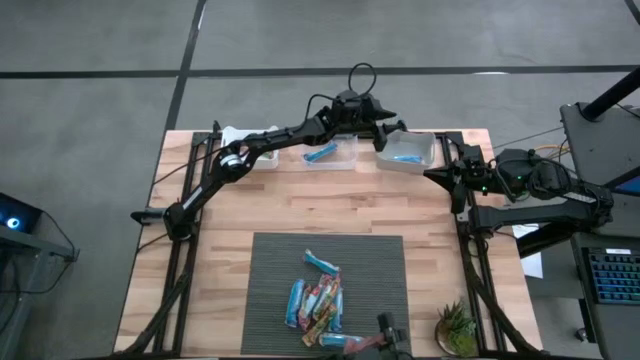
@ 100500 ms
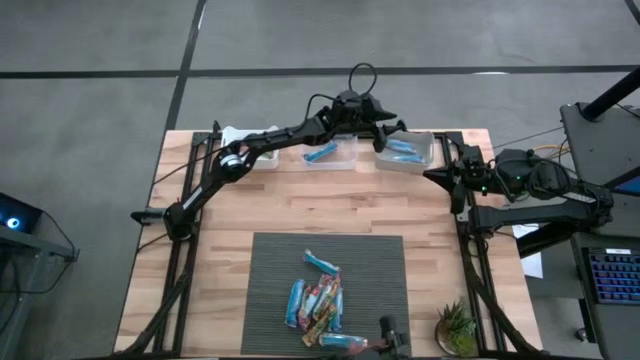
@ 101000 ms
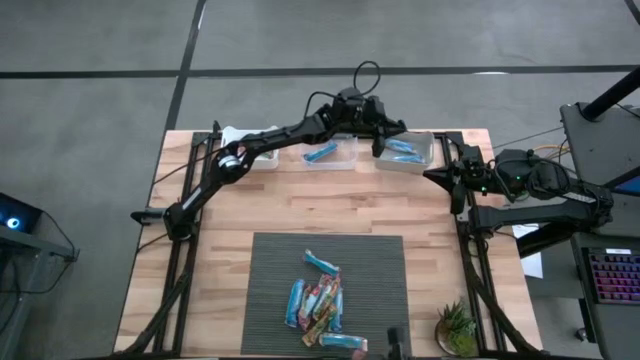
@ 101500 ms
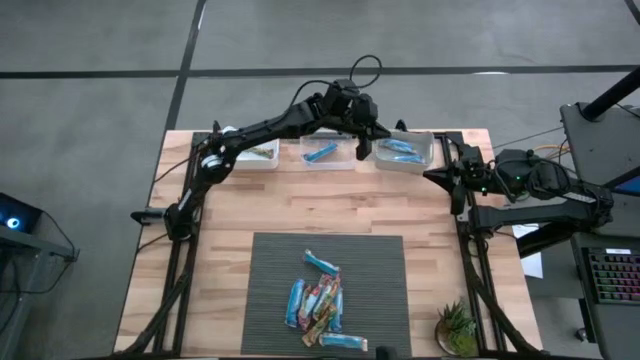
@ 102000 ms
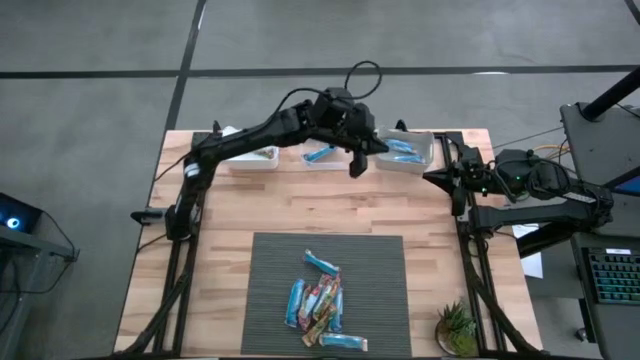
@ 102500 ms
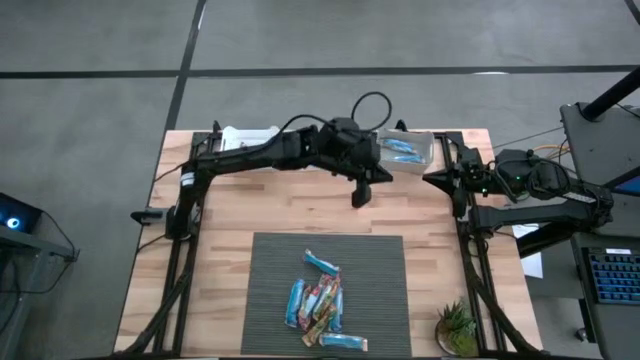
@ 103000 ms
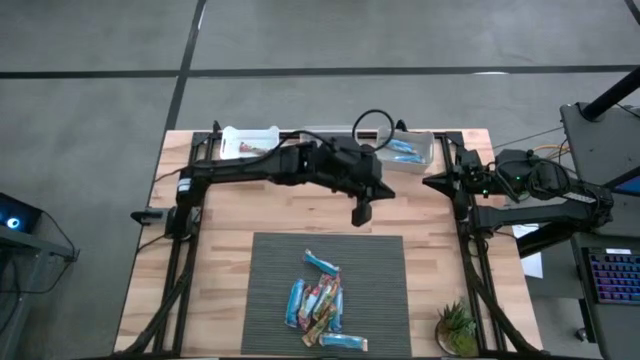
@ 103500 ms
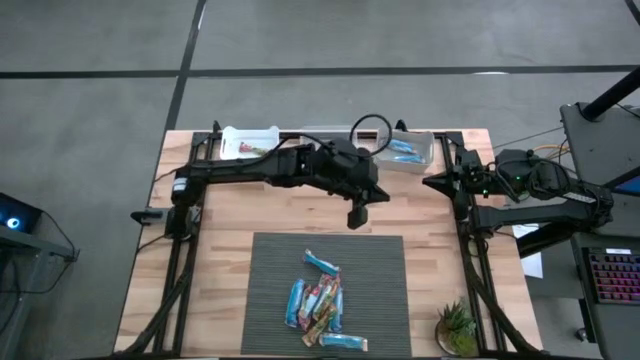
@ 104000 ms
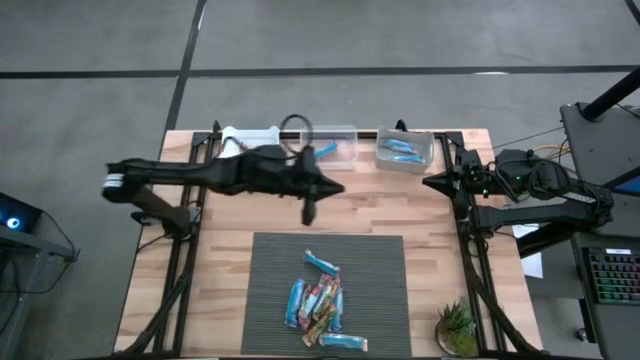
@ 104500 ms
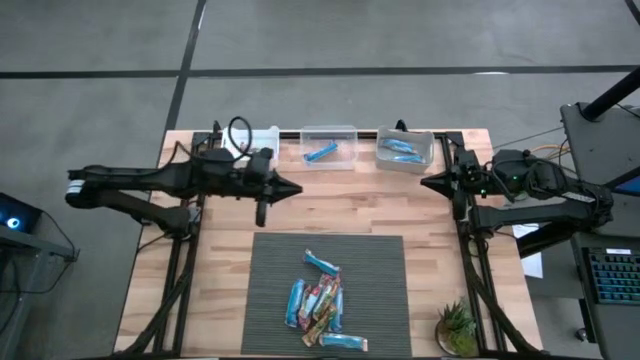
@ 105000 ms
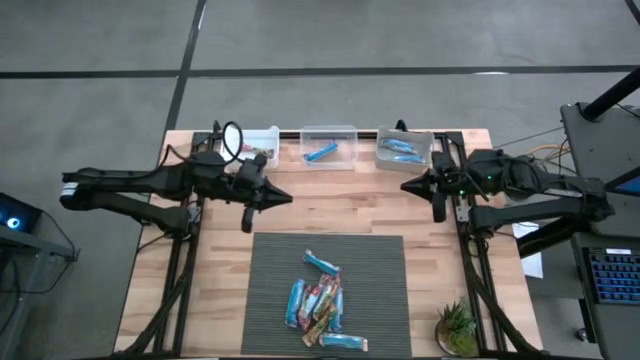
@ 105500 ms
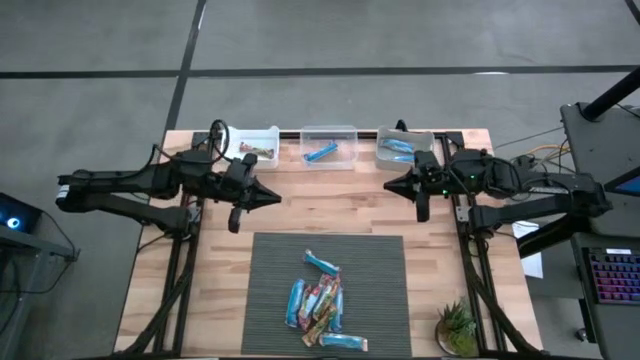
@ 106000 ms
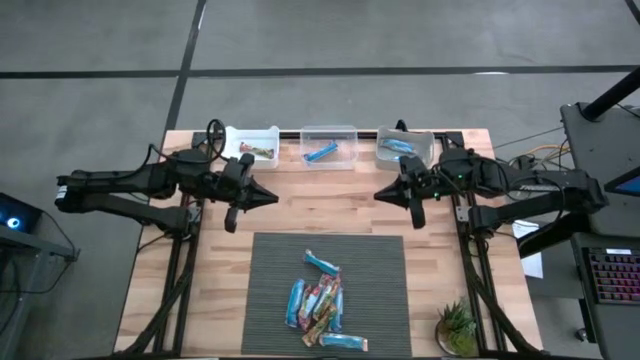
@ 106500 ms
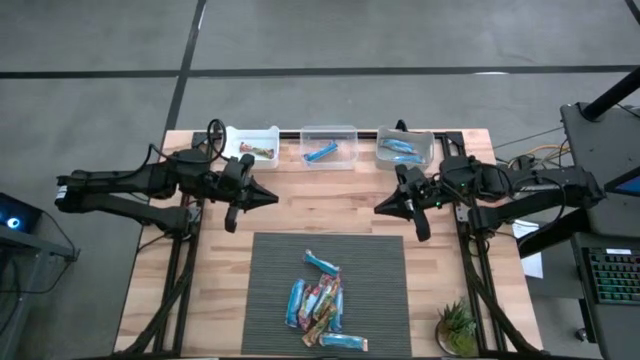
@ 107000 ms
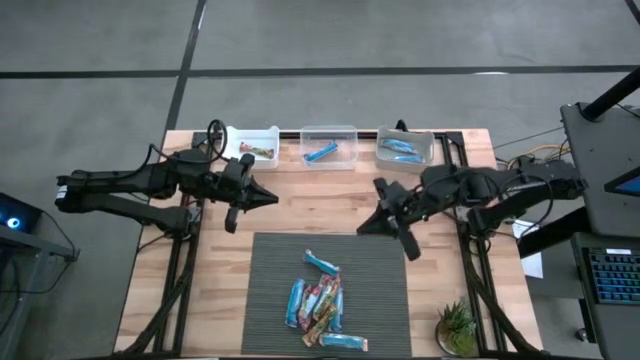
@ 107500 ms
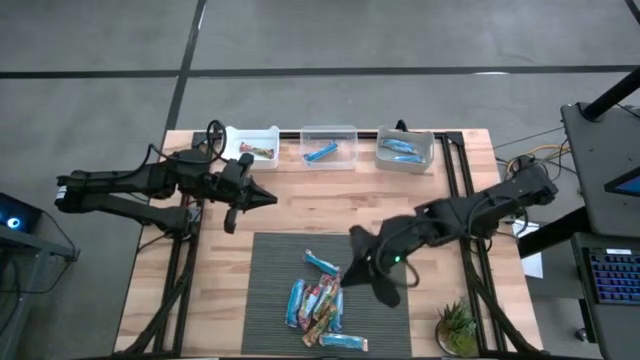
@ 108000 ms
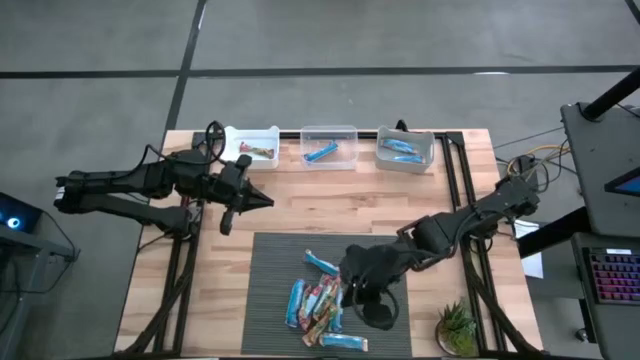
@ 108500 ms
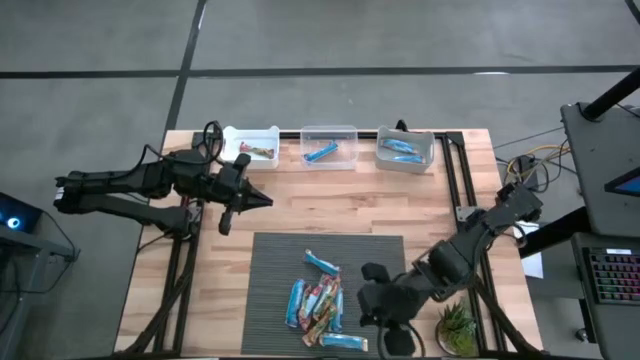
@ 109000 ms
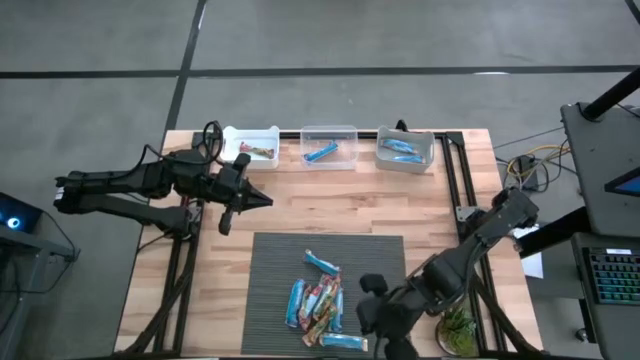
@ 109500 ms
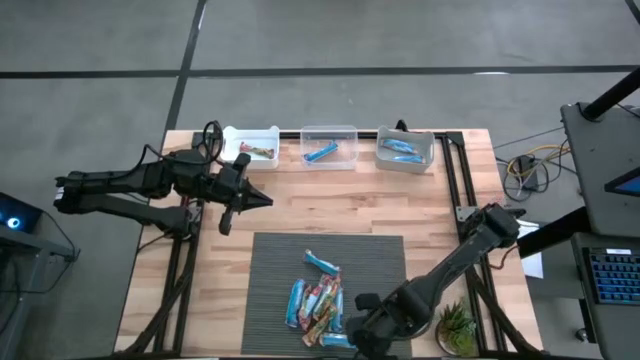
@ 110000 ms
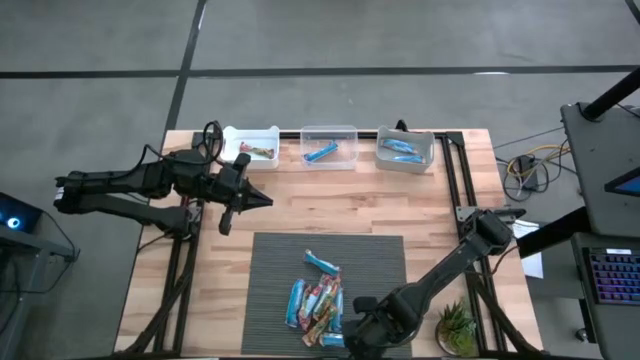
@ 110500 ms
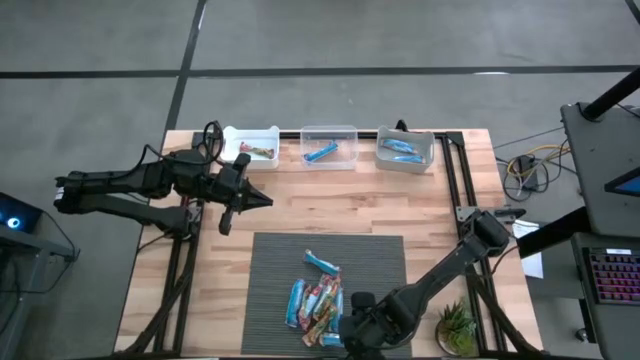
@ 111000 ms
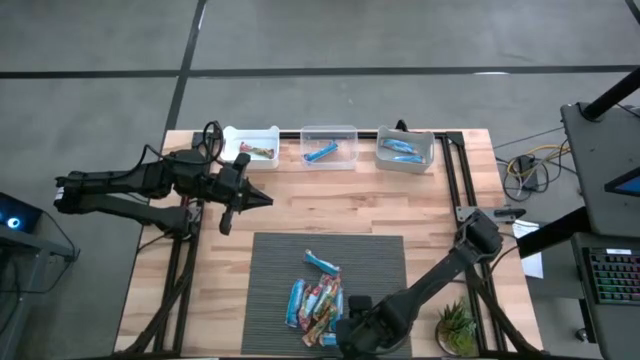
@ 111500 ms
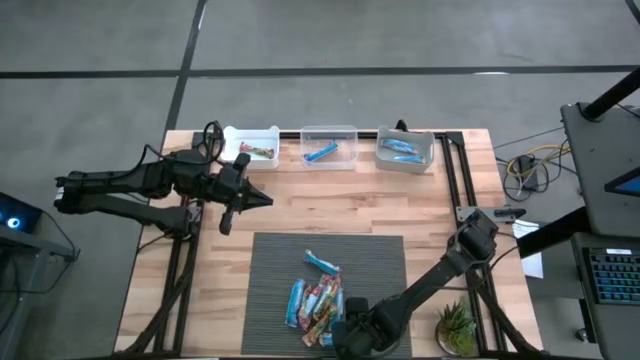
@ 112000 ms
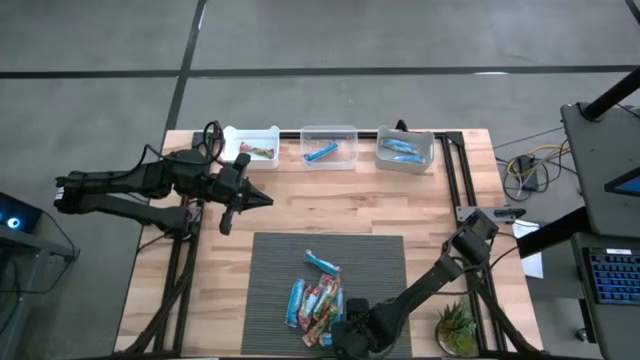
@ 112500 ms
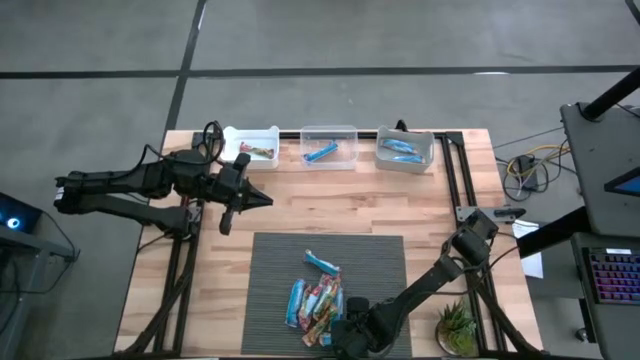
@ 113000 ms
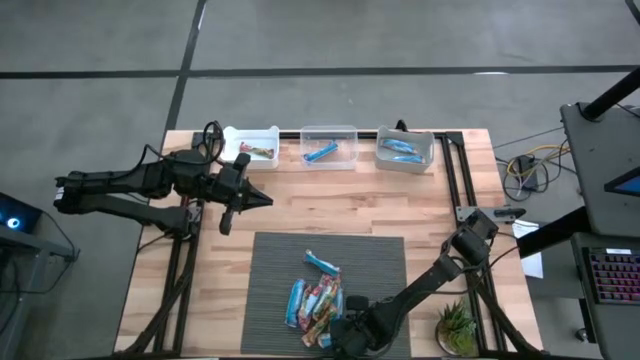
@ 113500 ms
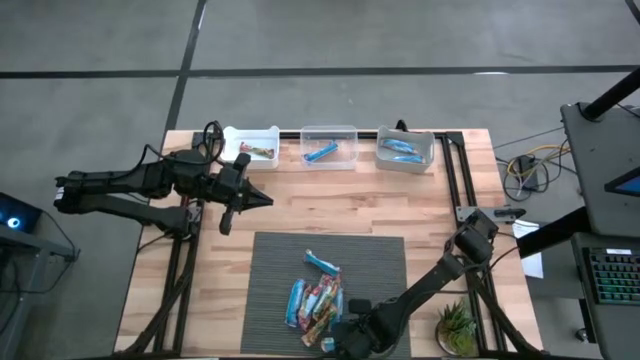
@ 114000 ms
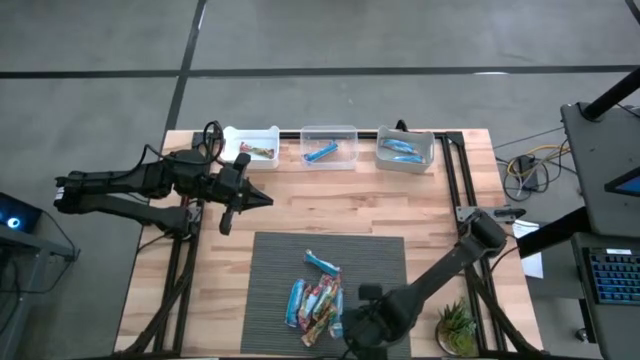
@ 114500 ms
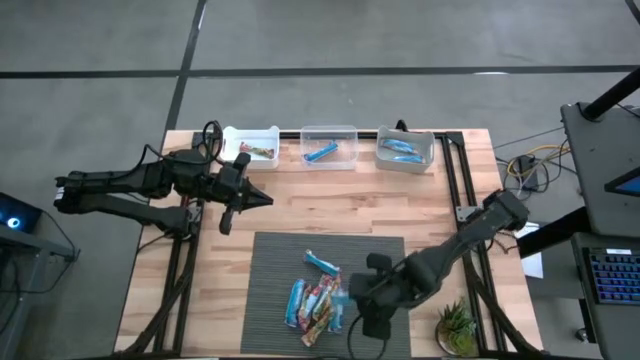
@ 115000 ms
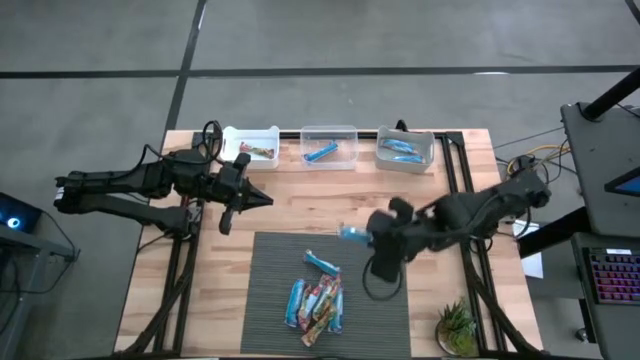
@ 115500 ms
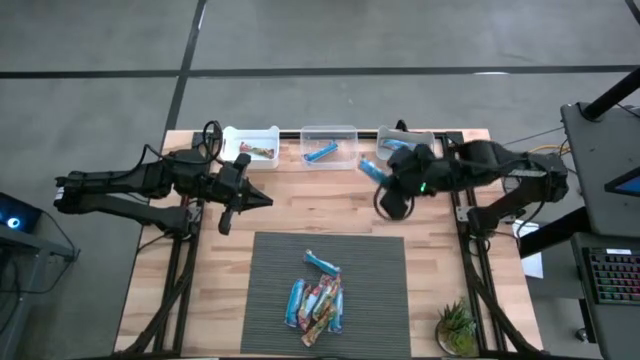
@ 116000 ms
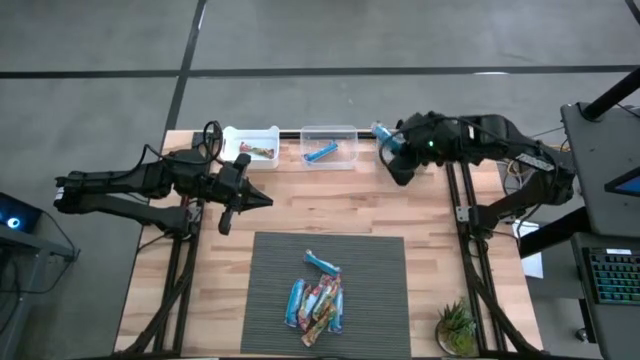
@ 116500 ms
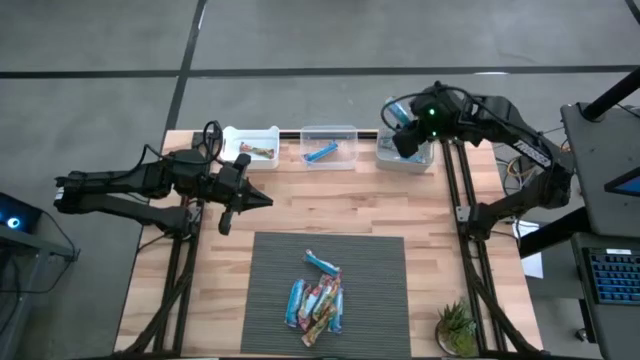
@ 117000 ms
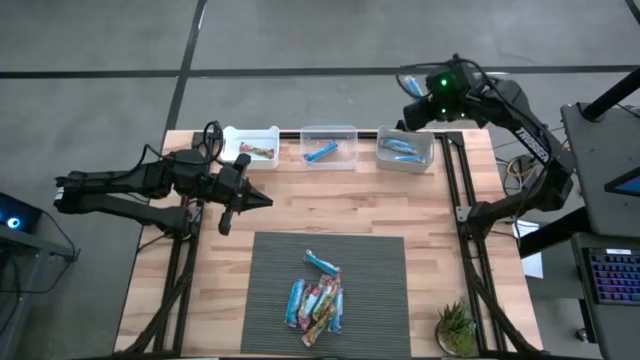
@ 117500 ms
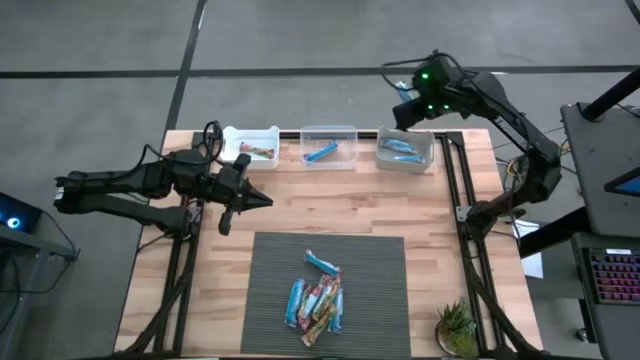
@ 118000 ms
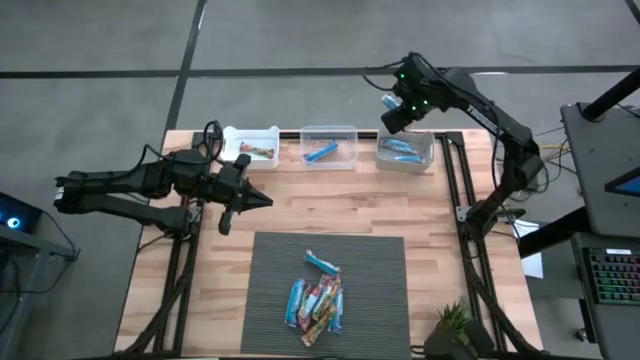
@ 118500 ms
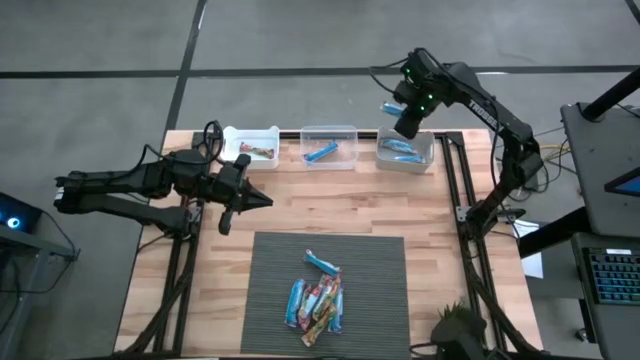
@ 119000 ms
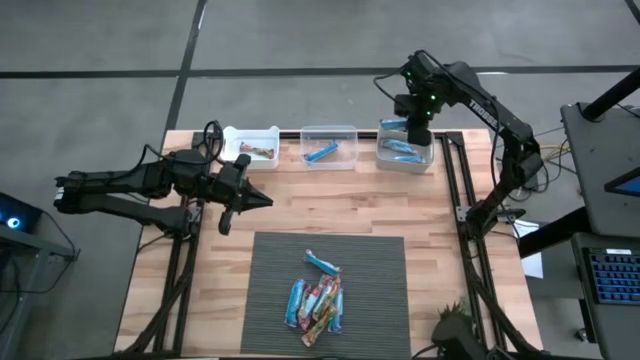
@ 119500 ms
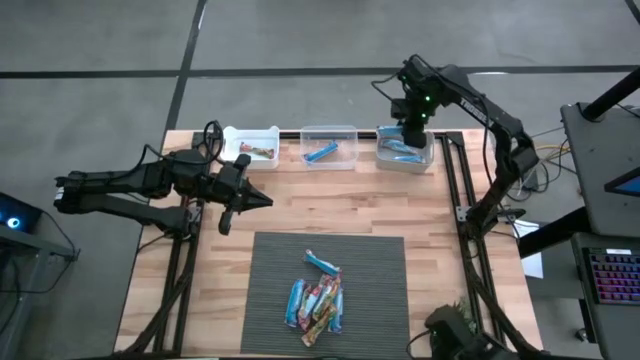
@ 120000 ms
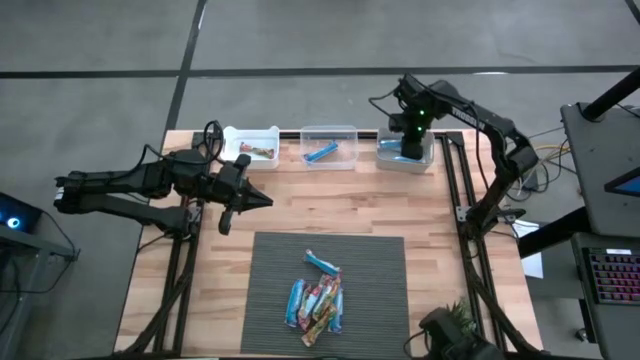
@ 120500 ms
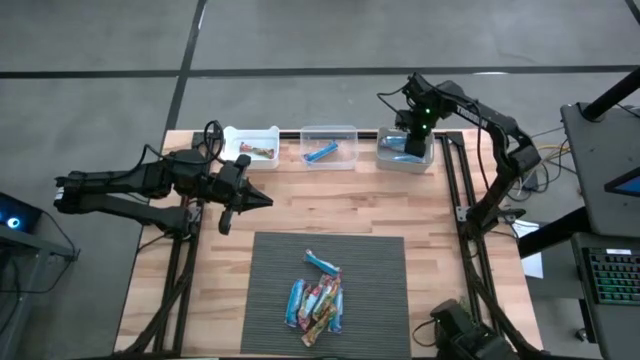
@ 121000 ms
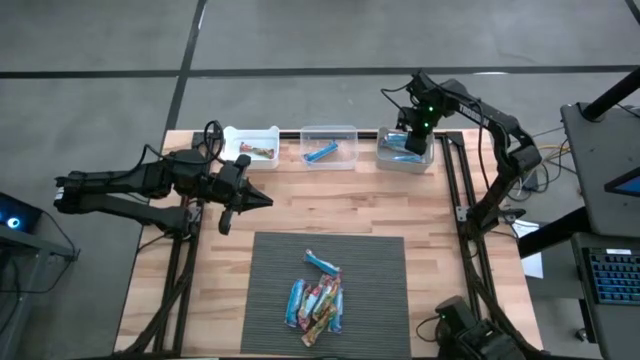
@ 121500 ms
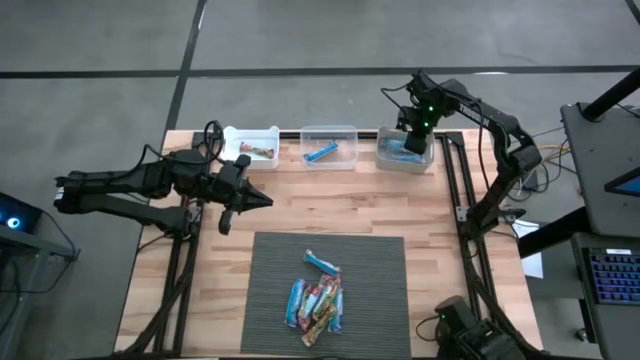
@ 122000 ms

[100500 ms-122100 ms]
Task: Pick and place Granola Bars by type
Put the yellow granola bar into the gray bin
